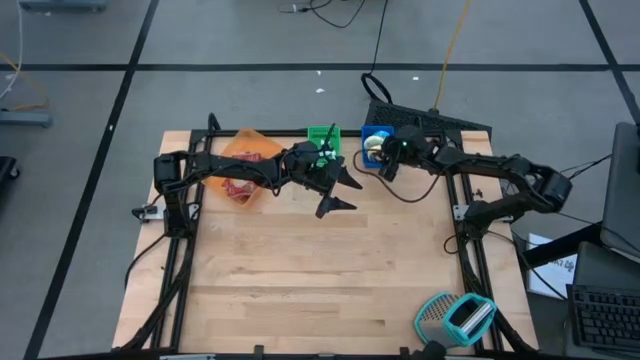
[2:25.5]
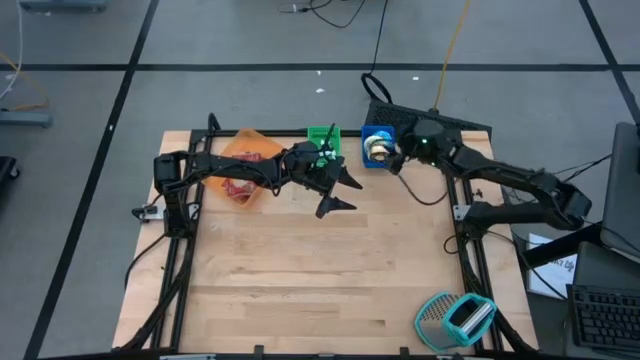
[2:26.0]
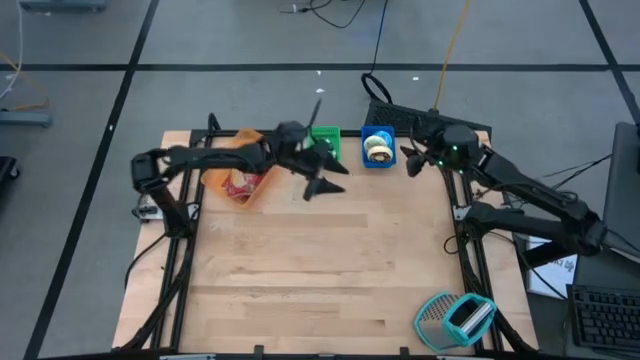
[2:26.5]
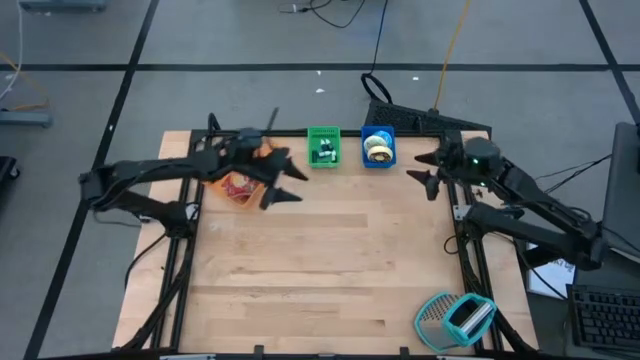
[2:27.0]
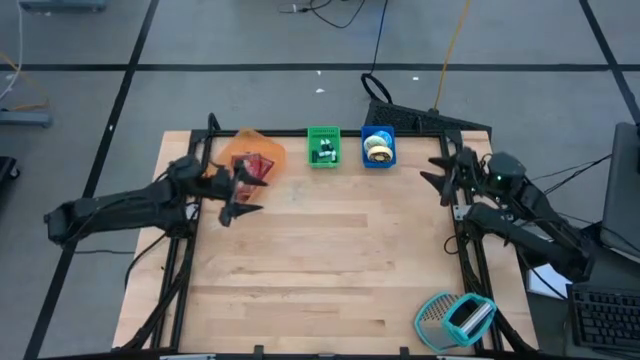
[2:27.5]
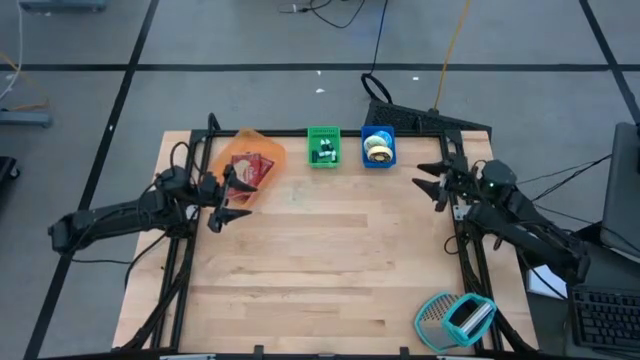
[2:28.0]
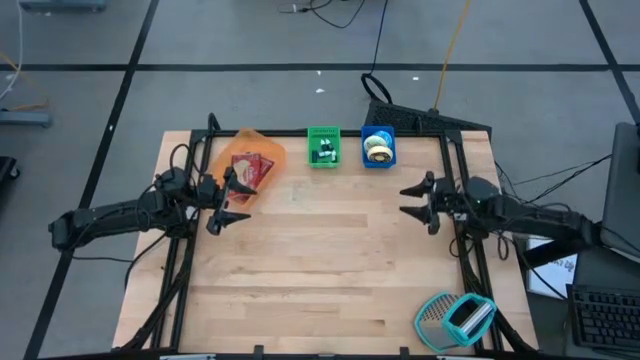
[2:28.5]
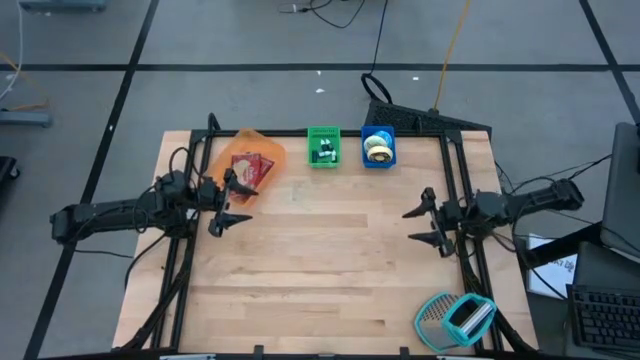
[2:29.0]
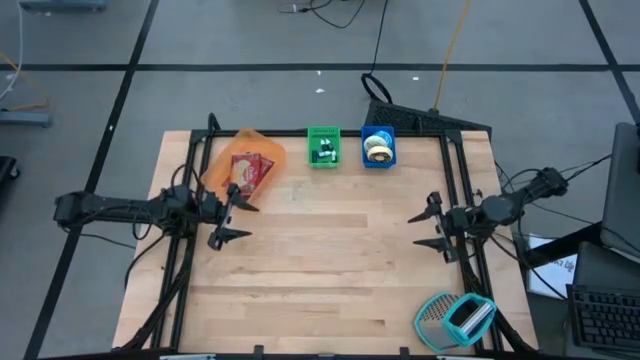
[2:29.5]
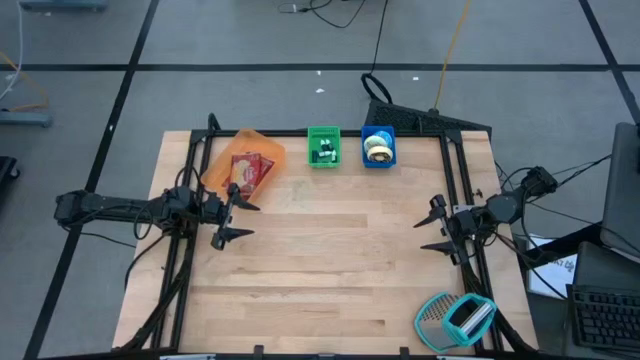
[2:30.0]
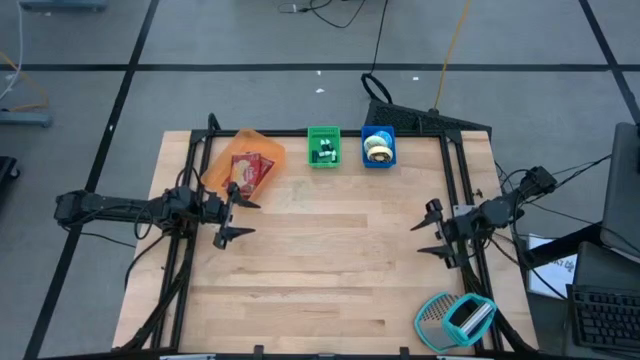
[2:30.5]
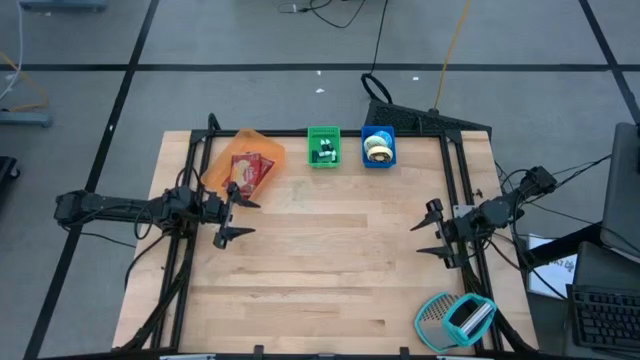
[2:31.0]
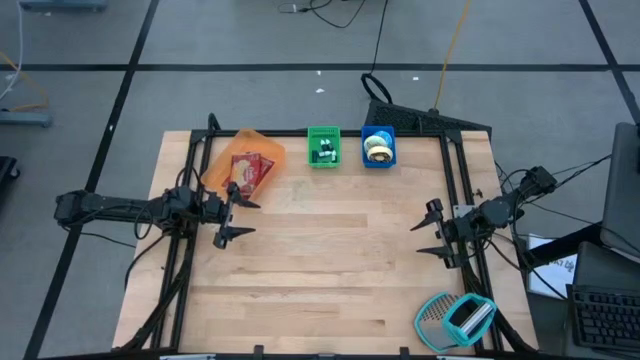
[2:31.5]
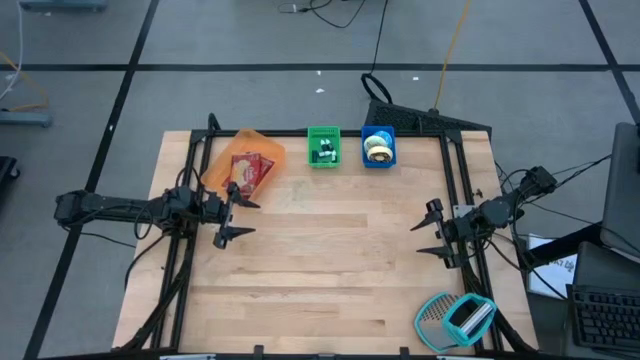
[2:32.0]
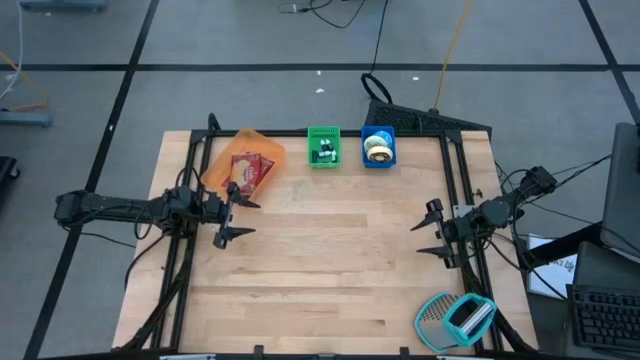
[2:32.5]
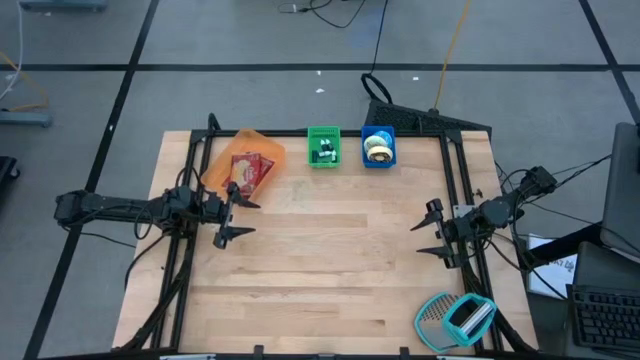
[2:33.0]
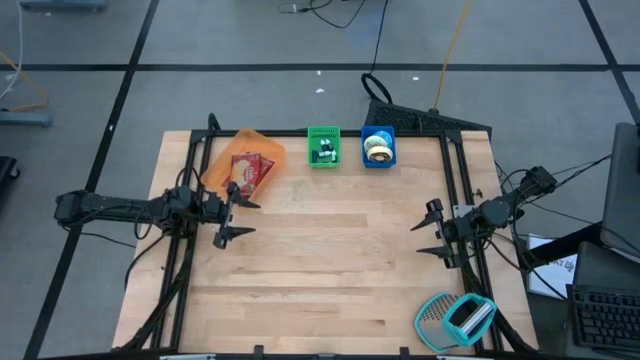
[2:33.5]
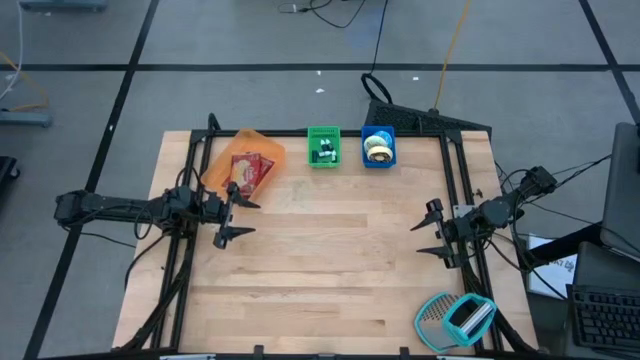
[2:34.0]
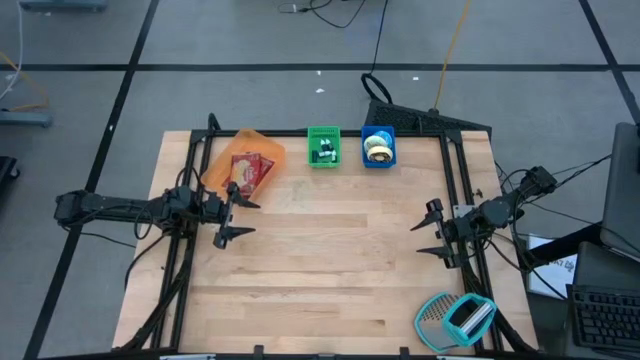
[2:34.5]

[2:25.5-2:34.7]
Return to Home Position
